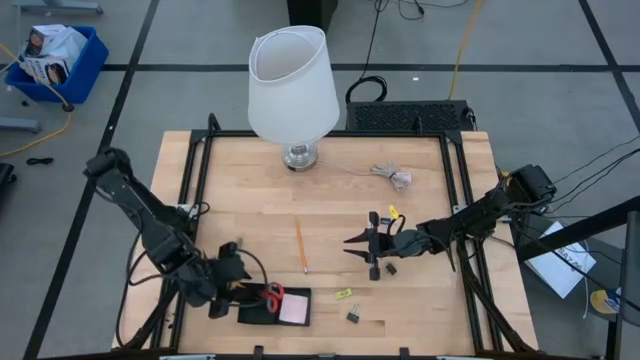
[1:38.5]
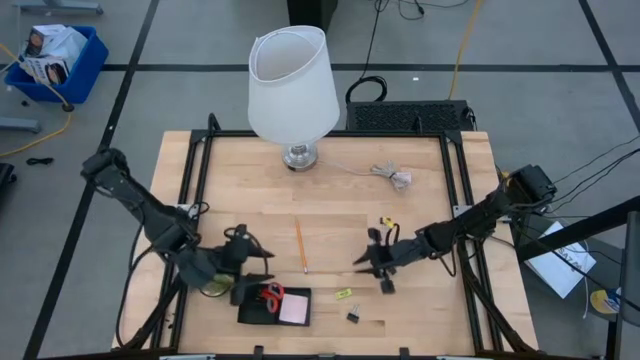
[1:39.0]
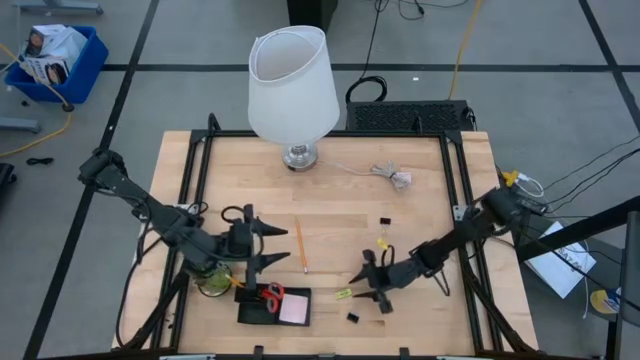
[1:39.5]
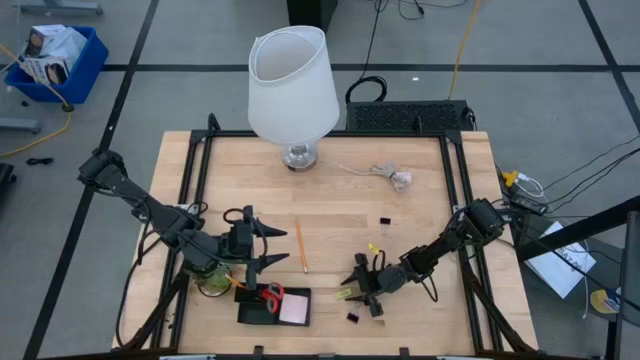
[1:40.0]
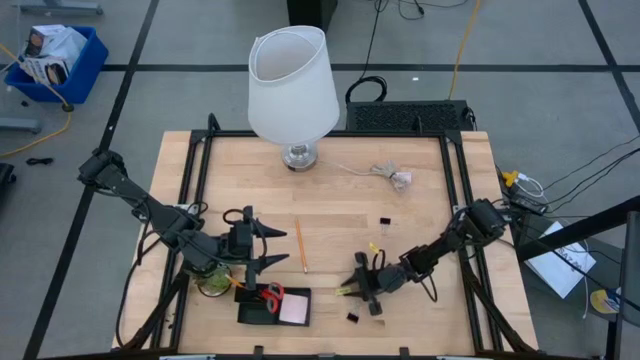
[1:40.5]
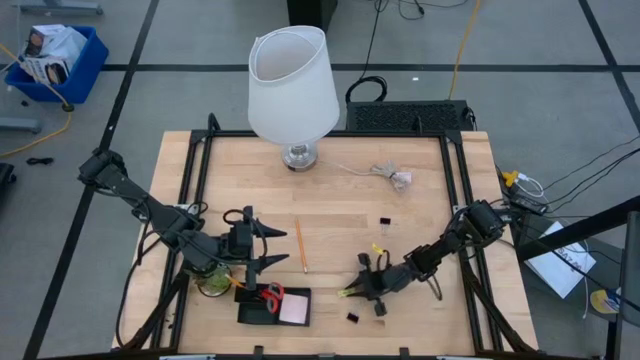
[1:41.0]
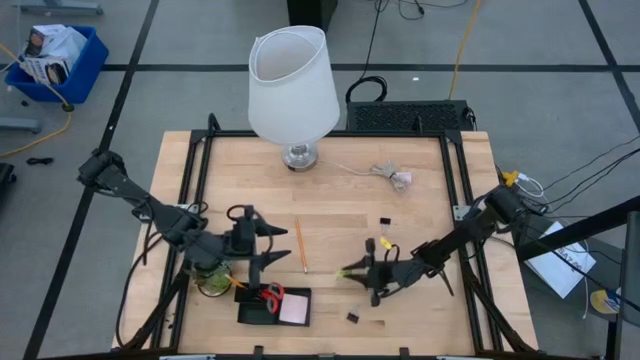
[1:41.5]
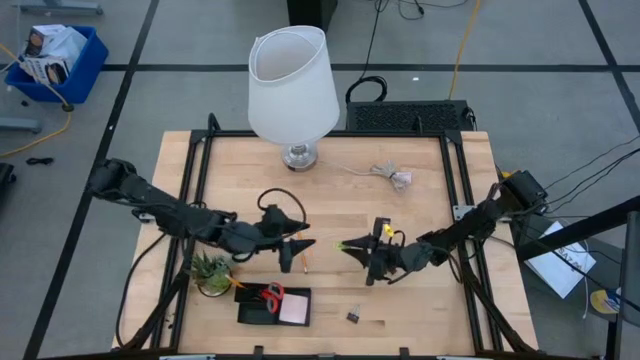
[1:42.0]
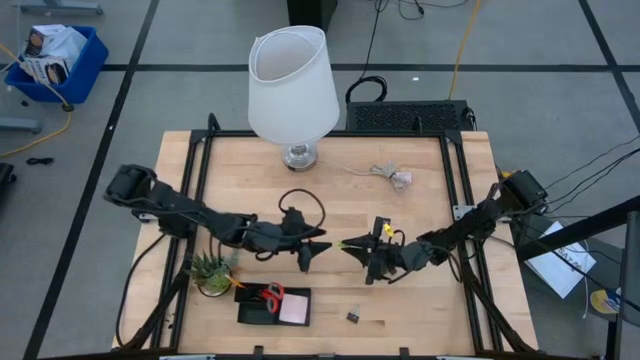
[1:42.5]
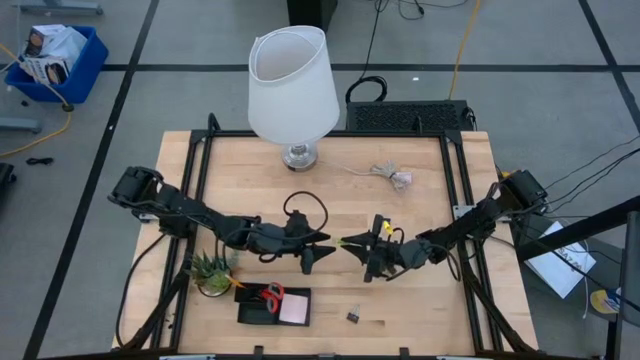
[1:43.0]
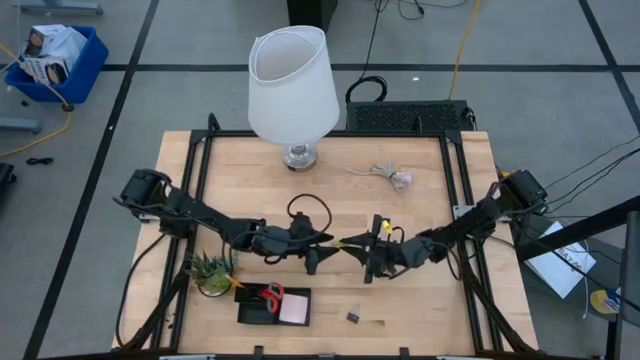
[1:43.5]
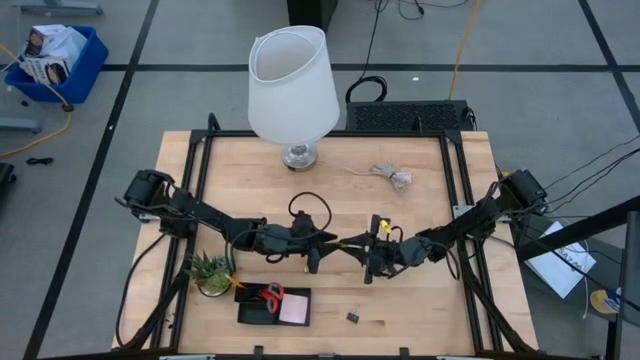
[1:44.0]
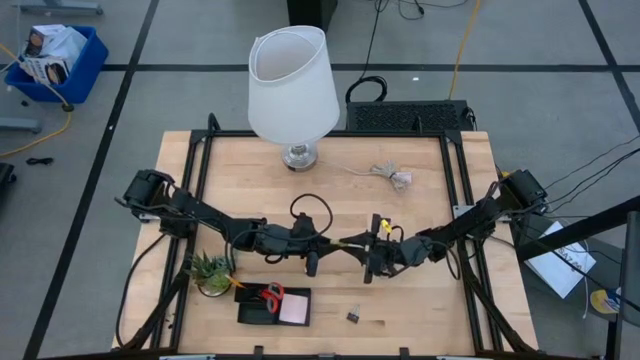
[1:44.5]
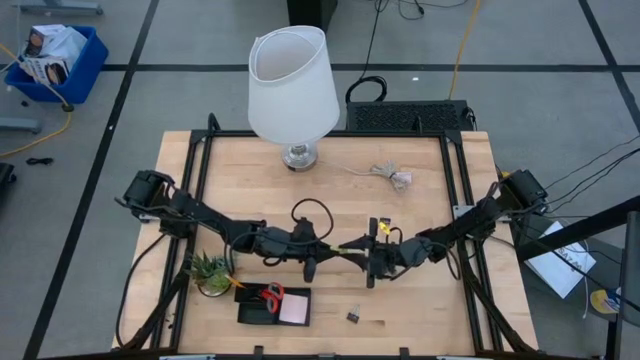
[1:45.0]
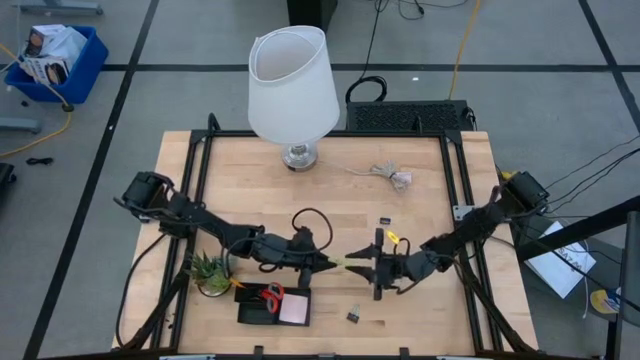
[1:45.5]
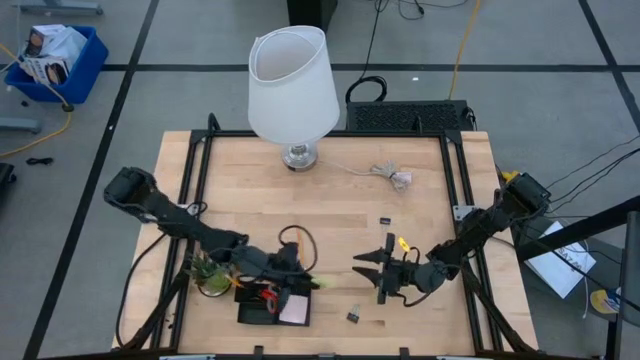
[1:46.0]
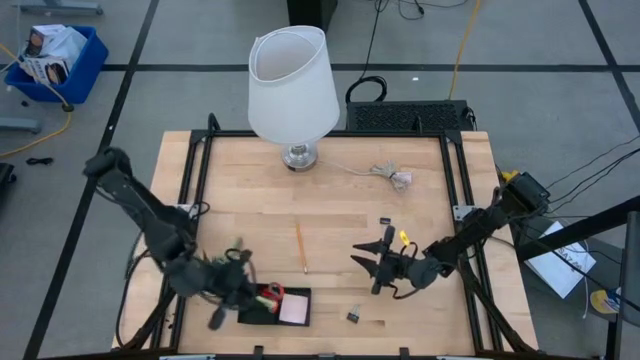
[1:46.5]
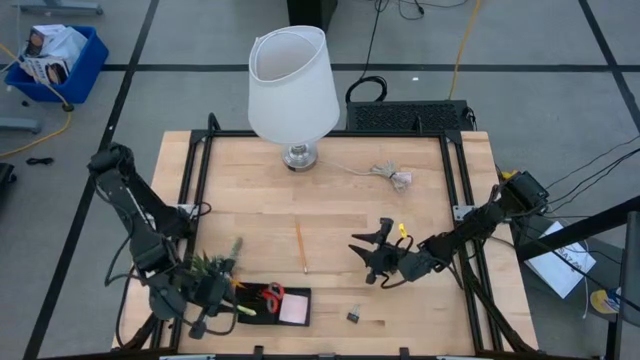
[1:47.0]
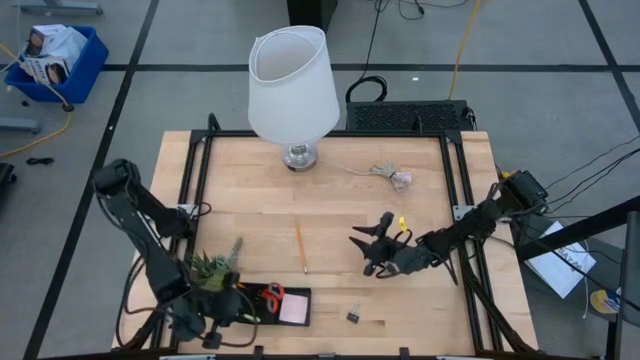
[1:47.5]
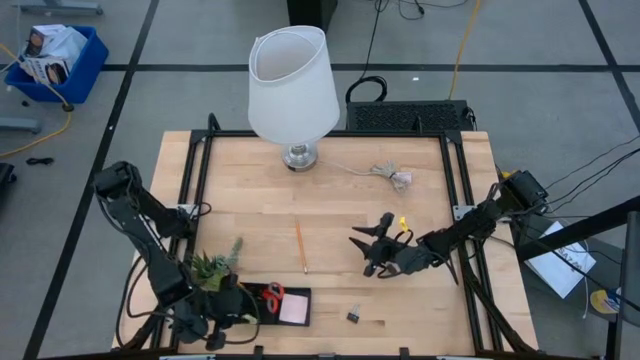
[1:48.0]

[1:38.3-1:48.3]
Task: Pick and place office supplies into organizer
Put the light green eraser into the black desk organizer

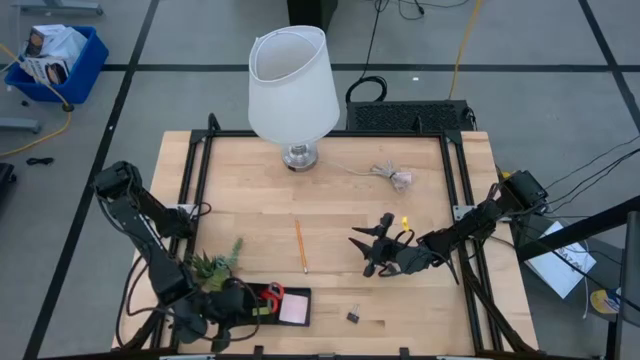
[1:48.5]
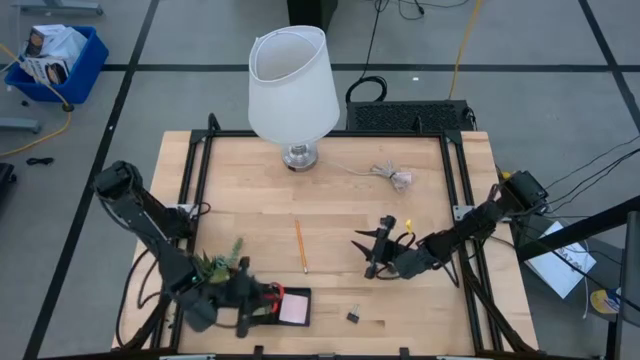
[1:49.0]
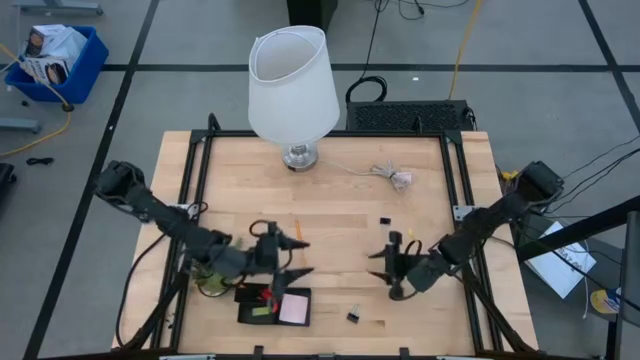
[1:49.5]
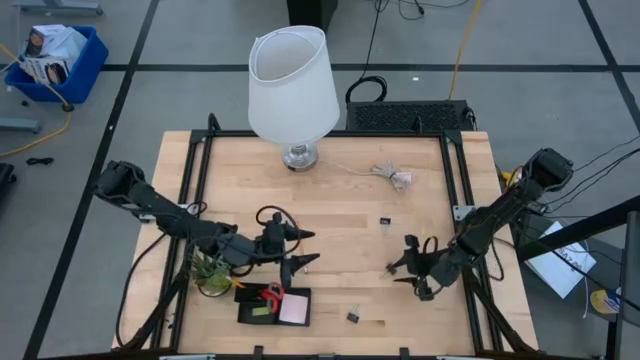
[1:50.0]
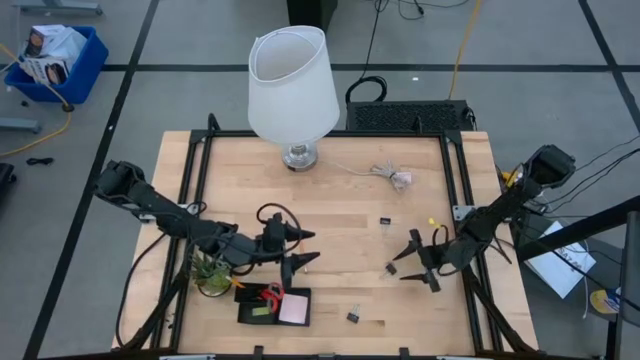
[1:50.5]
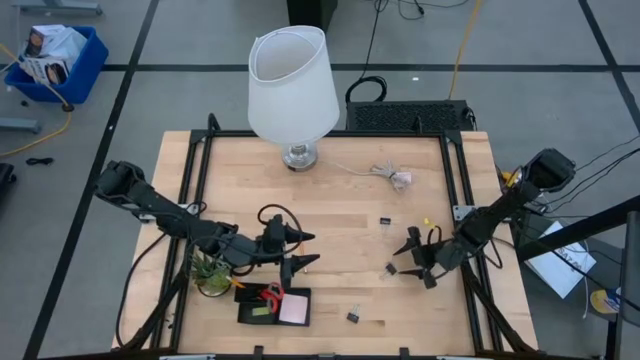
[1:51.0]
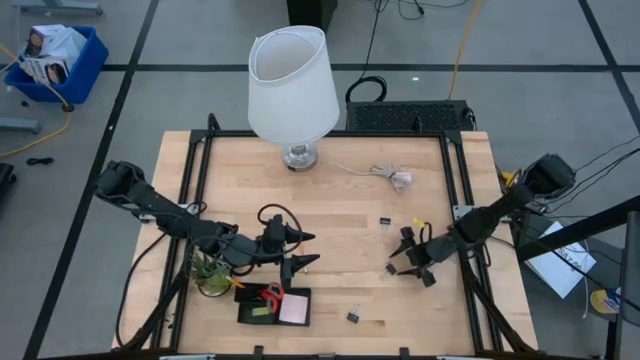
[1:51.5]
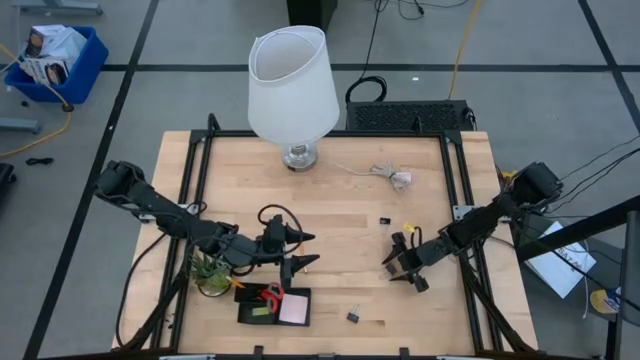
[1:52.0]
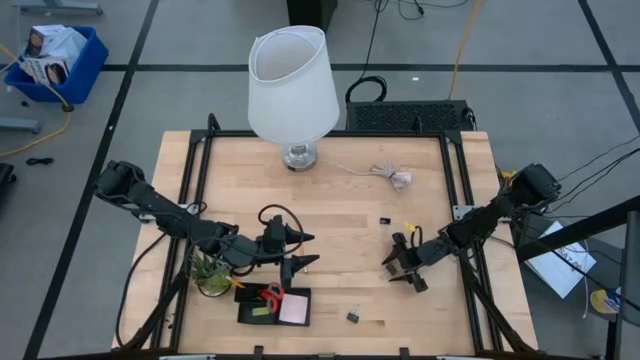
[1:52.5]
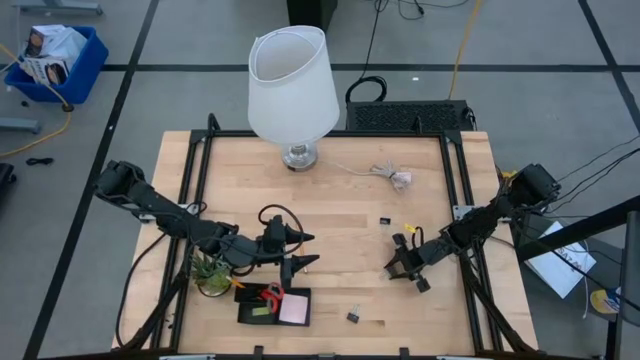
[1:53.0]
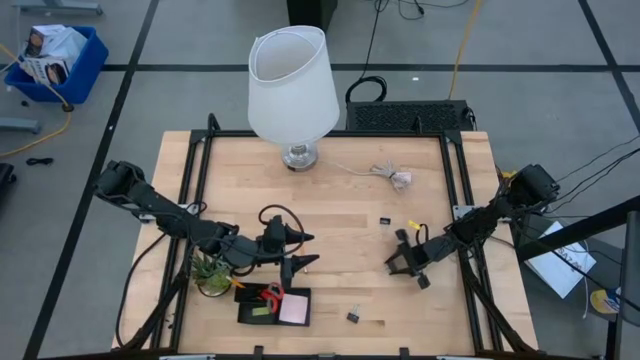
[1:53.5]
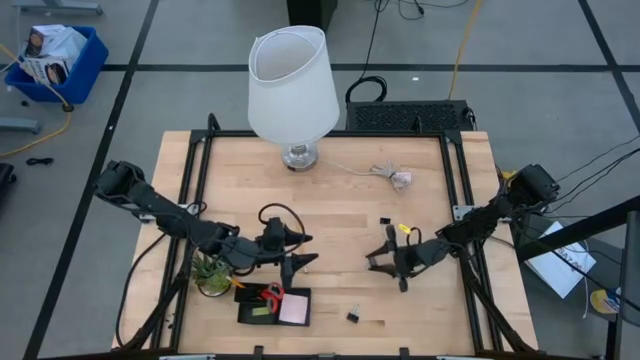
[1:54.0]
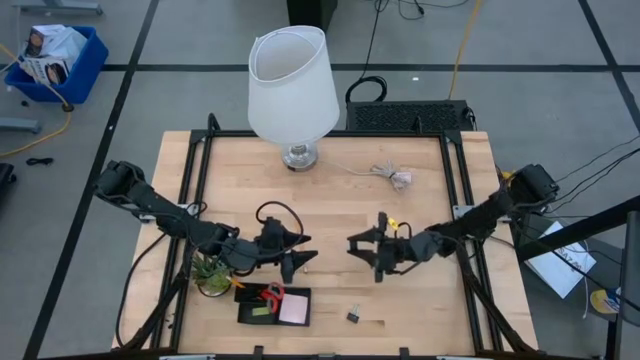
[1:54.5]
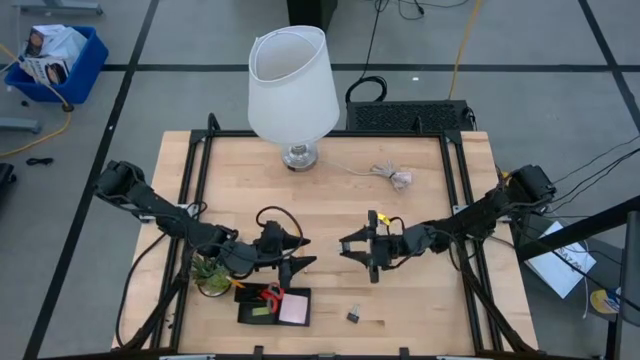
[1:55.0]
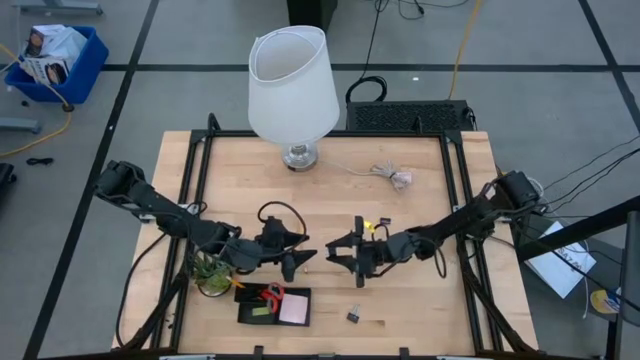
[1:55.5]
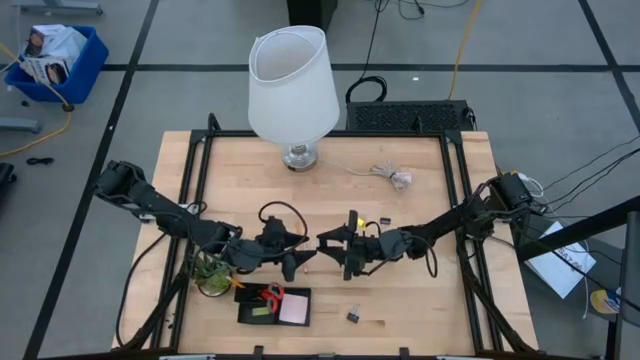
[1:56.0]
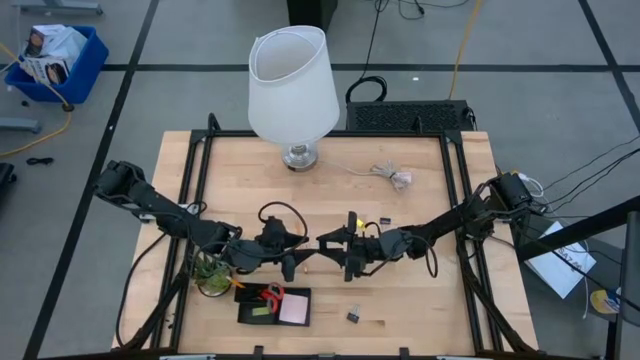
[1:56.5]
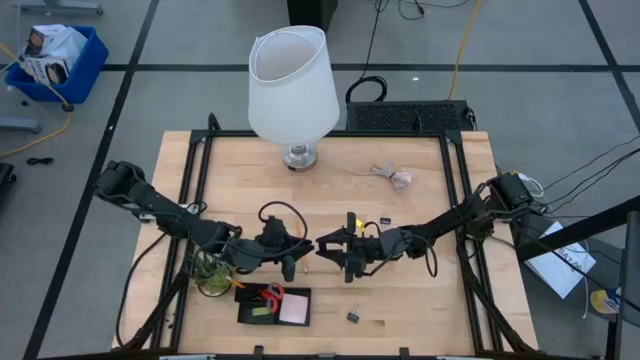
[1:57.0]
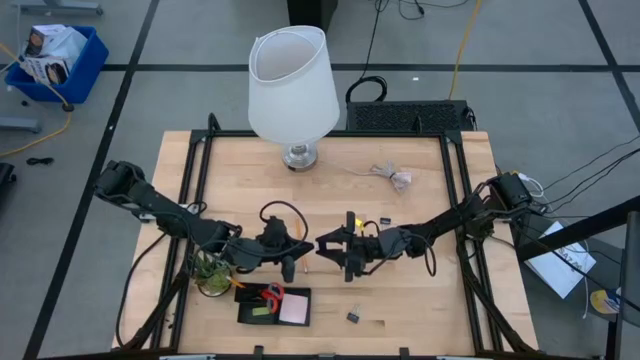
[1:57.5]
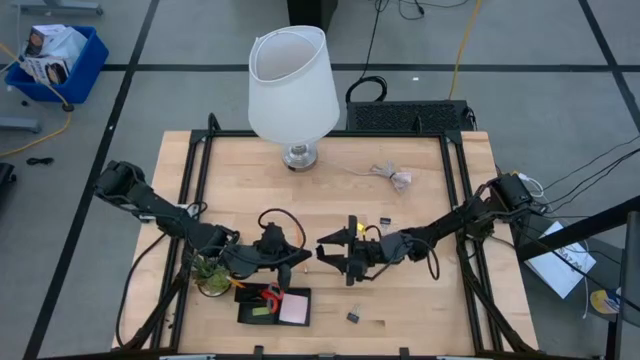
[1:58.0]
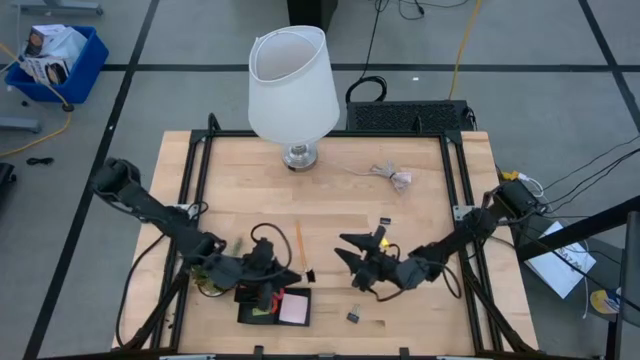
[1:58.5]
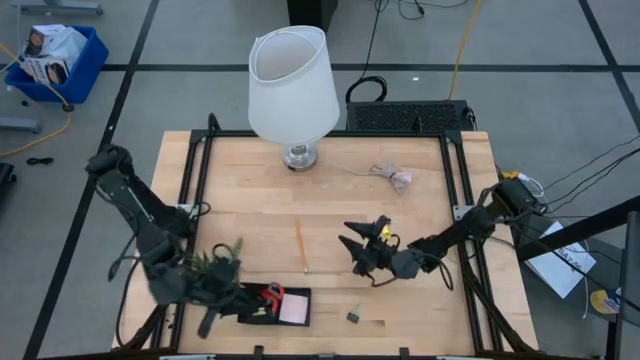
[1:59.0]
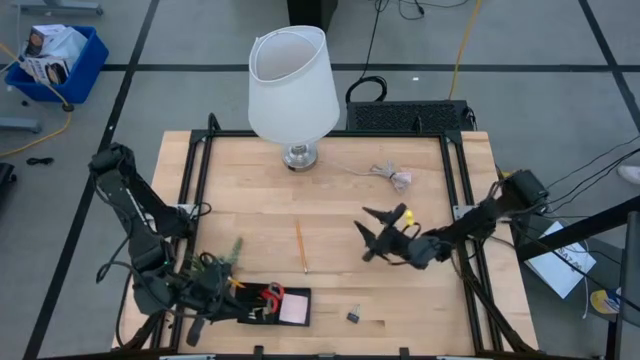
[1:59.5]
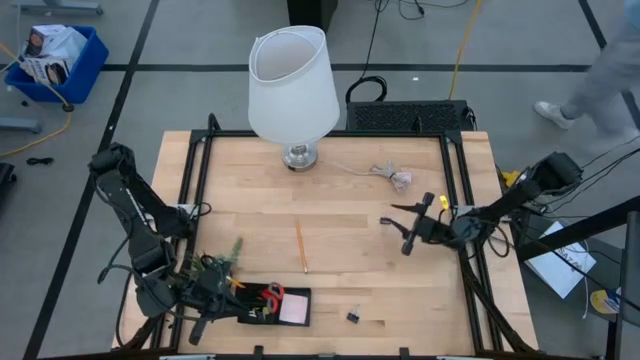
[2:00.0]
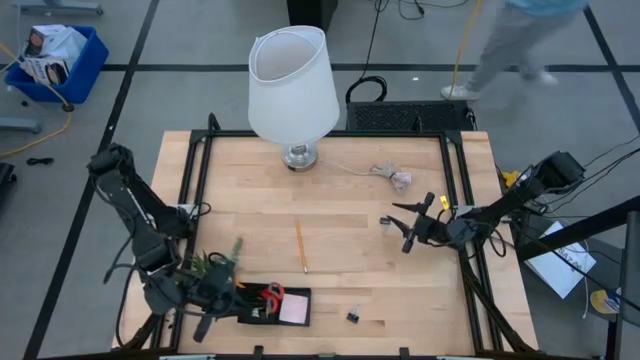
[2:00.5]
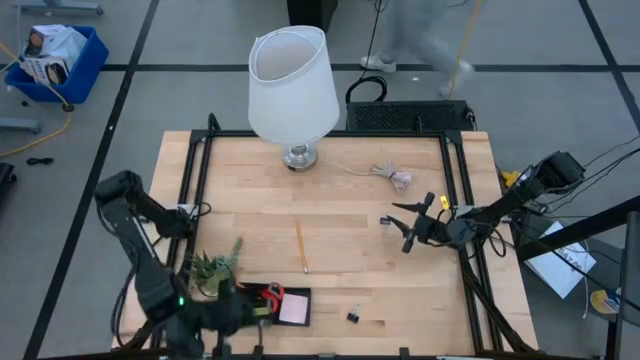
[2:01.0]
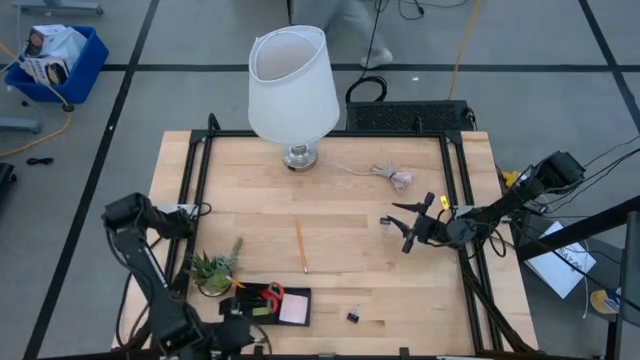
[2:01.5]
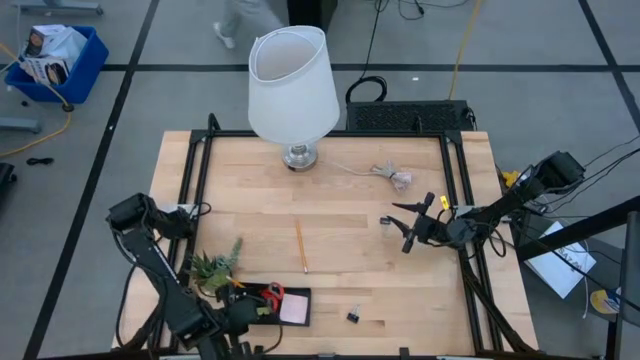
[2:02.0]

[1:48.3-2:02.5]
Put the black paper clip into the black desk organizer
